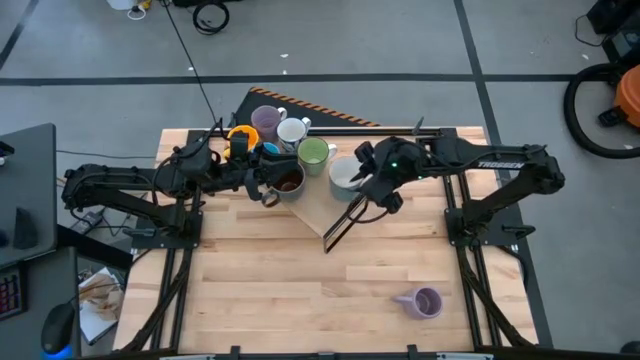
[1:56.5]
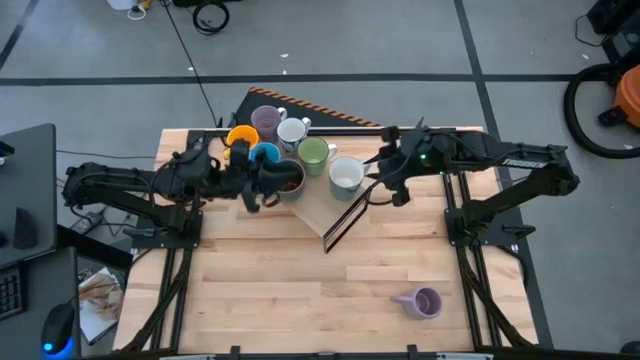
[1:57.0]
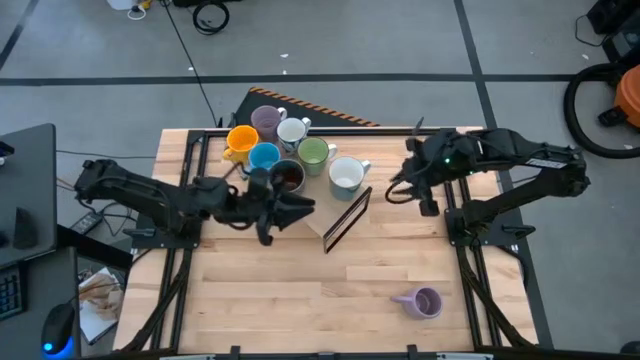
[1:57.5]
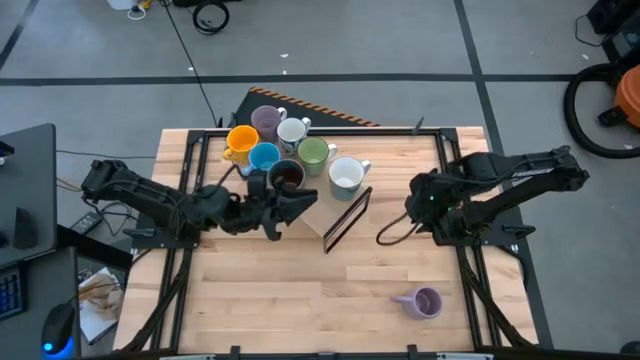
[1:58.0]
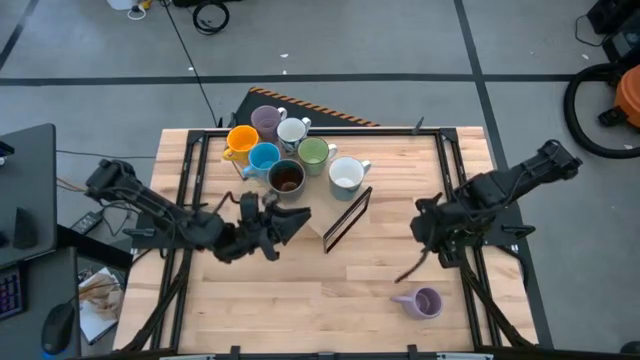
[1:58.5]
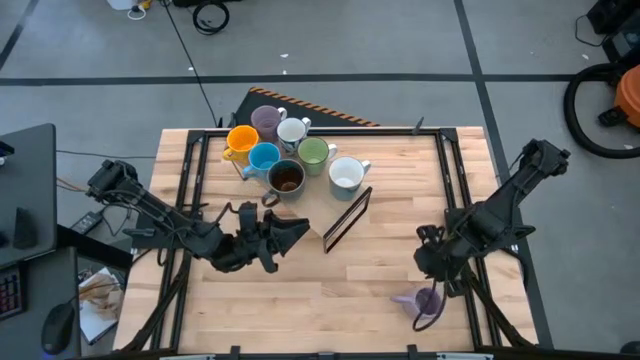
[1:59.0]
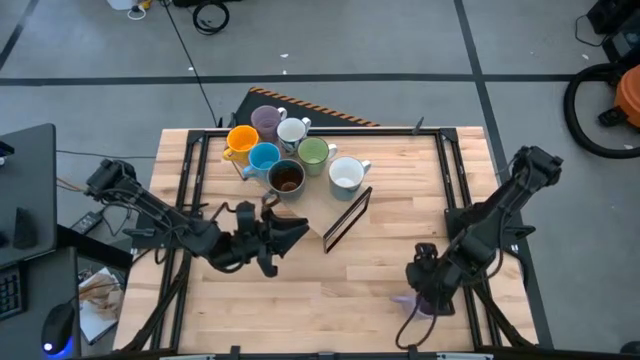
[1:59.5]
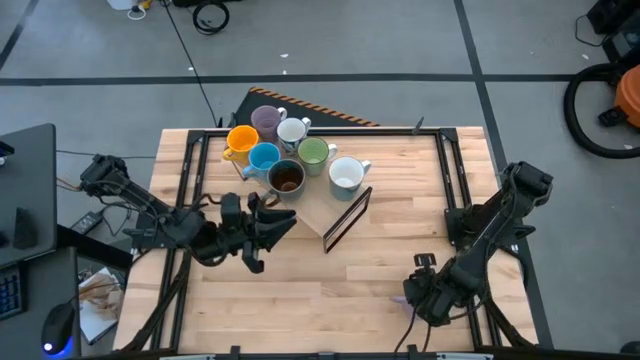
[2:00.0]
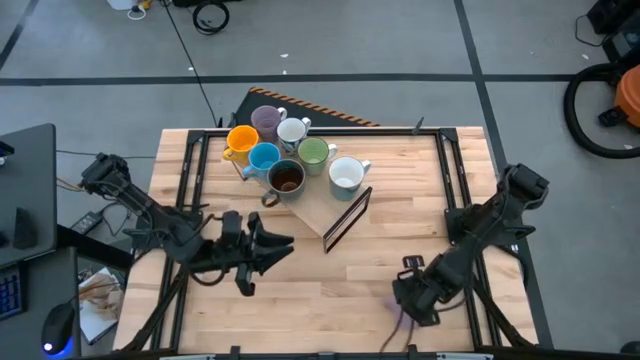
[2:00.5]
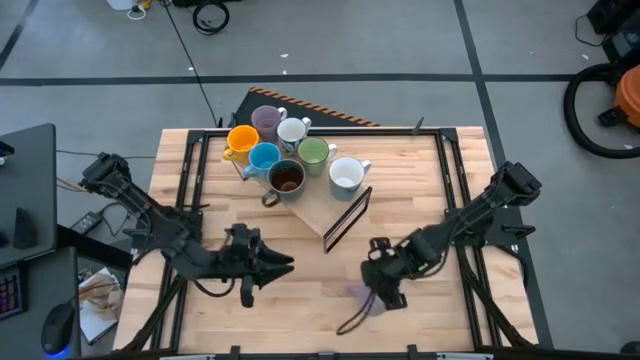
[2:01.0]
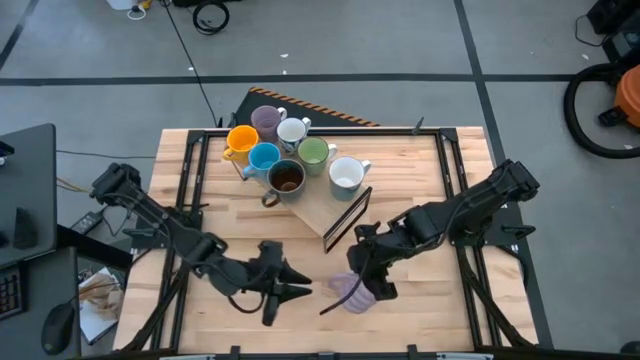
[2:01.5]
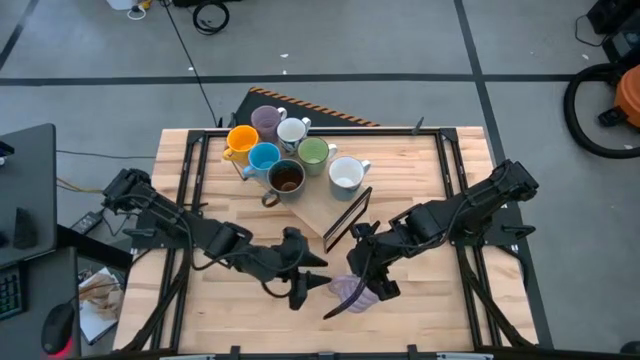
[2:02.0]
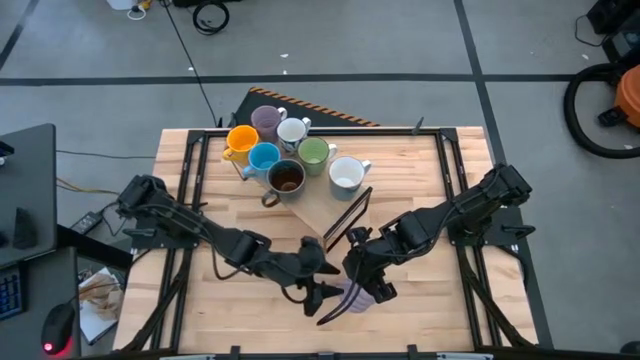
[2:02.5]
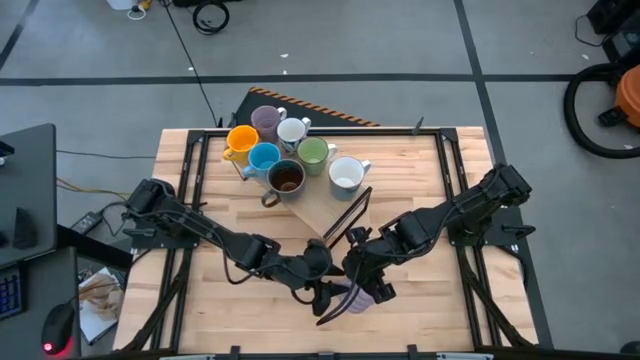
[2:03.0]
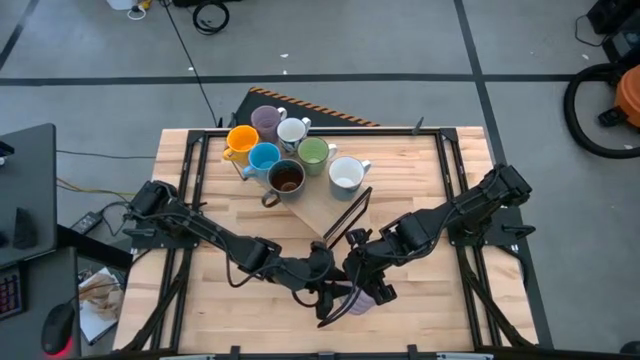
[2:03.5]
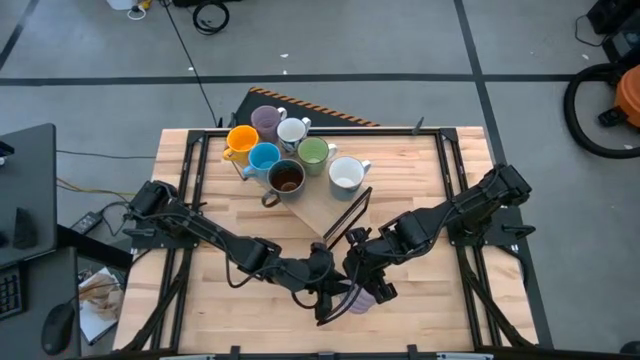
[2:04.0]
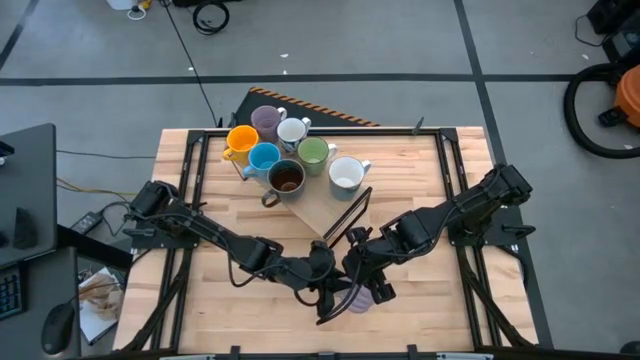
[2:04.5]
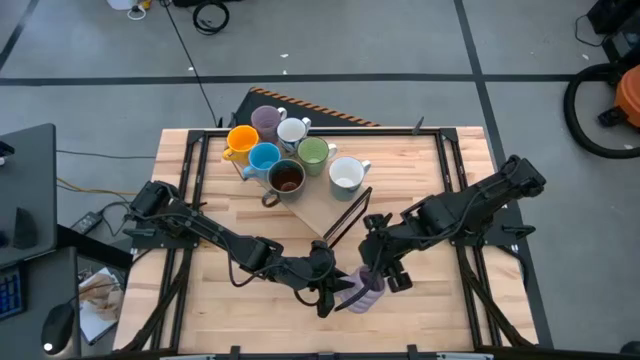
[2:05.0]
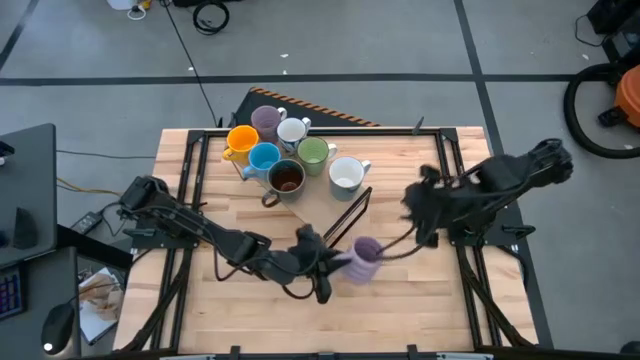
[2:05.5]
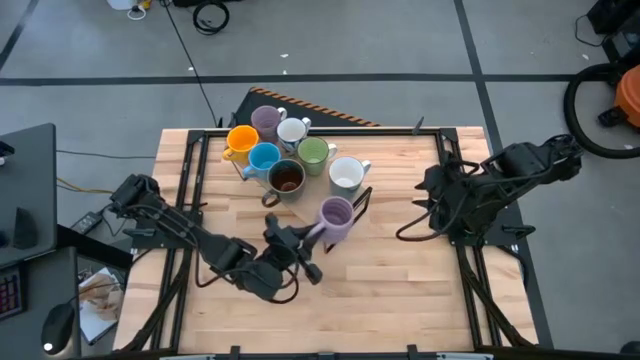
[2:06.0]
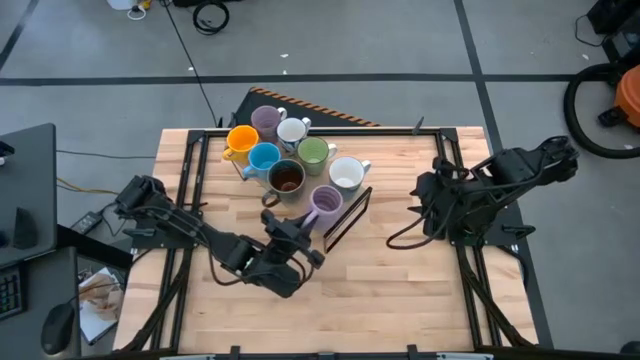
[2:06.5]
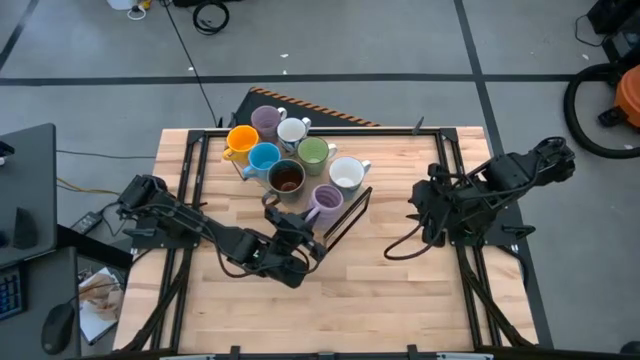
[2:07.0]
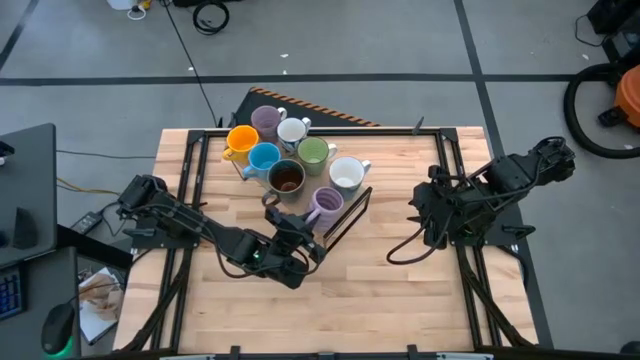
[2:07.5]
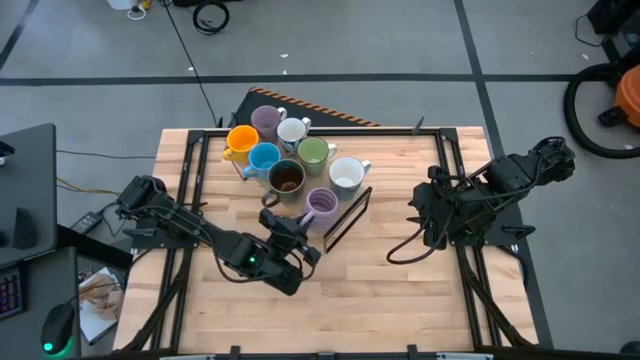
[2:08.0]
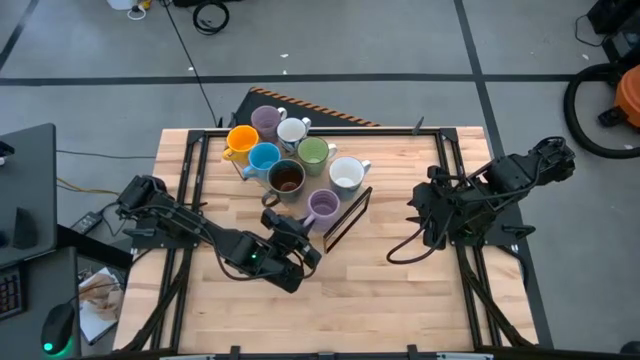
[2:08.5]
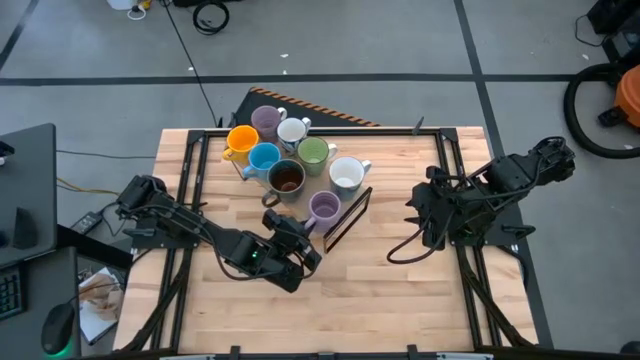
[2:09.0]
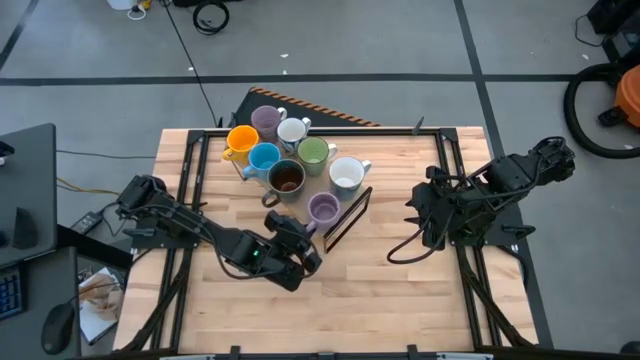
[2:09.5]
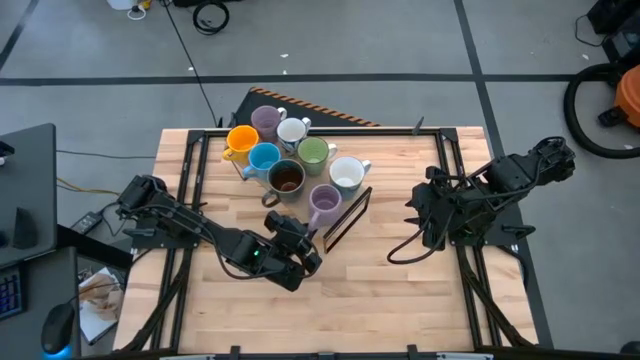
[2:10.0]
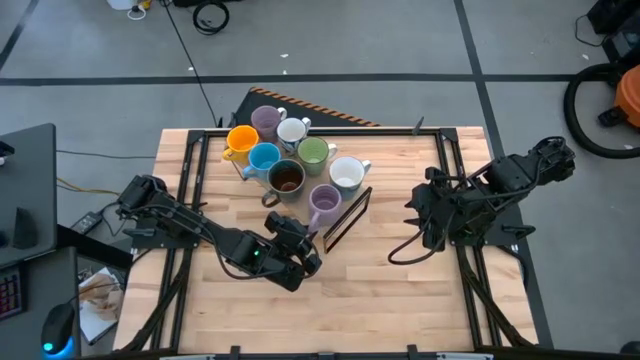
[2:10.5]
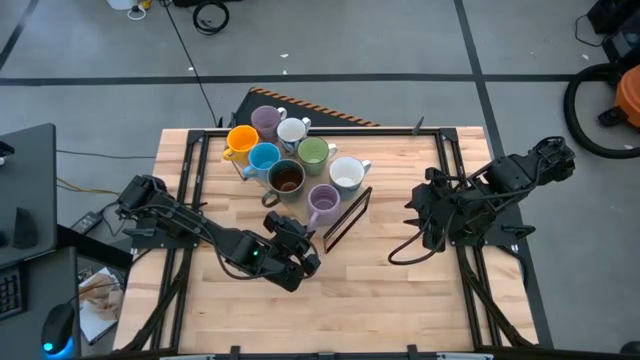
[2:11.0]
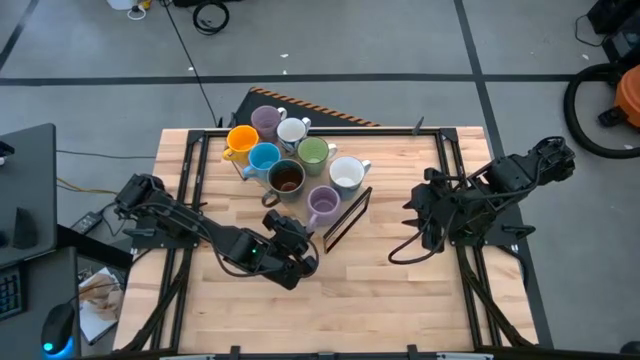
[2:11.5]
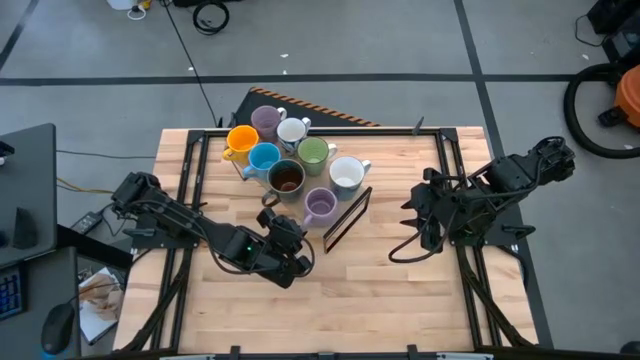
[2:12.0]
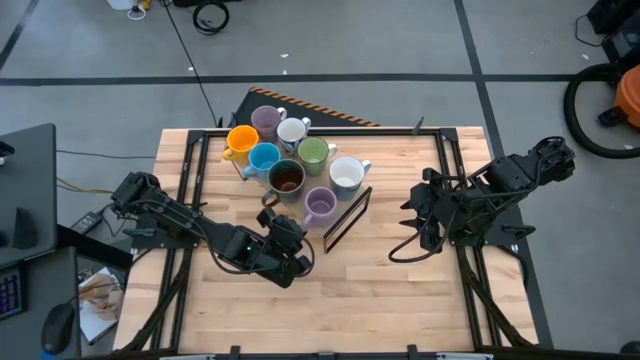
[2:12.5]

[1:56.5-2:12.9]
Task: Place coffee mugs
Put the violet mug on the shelf
